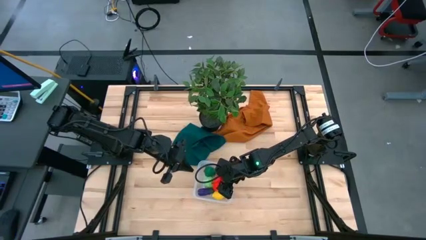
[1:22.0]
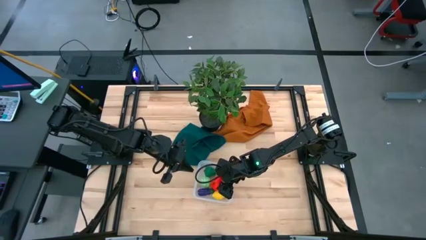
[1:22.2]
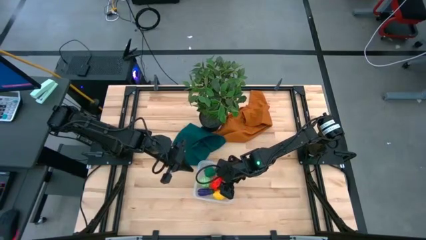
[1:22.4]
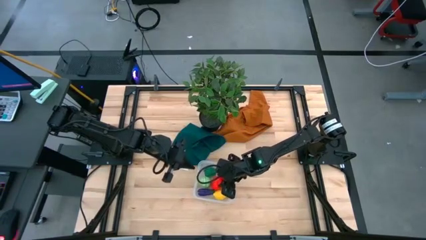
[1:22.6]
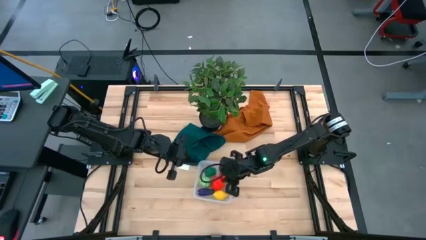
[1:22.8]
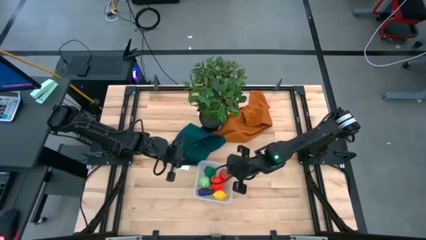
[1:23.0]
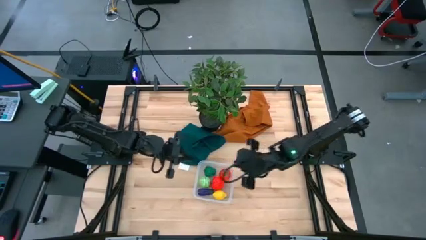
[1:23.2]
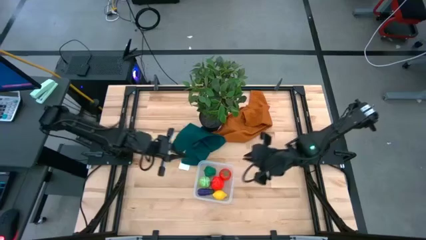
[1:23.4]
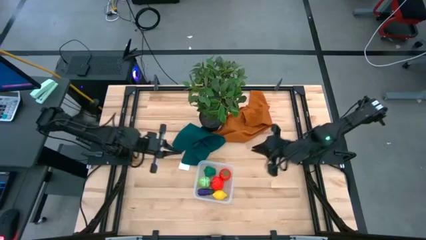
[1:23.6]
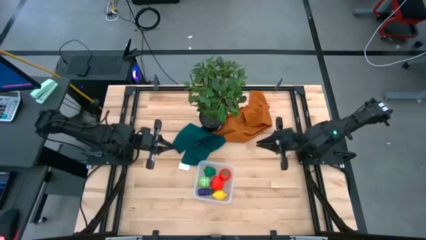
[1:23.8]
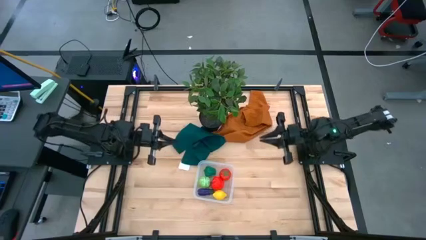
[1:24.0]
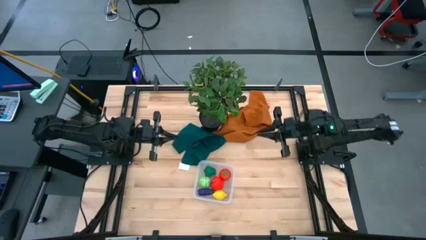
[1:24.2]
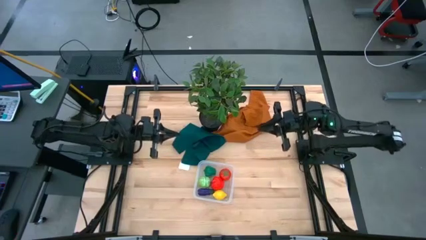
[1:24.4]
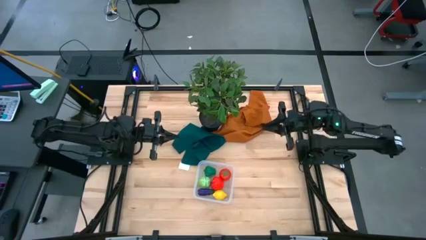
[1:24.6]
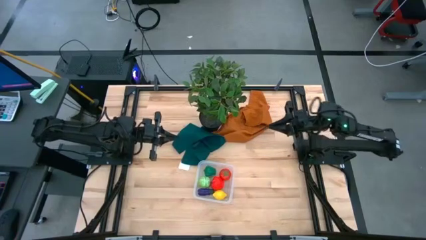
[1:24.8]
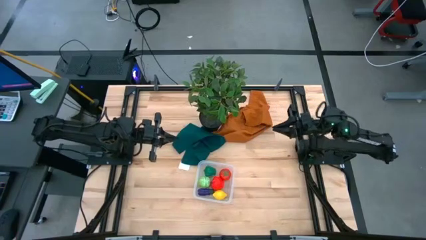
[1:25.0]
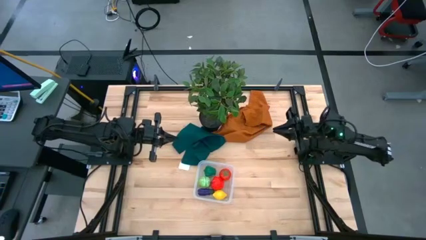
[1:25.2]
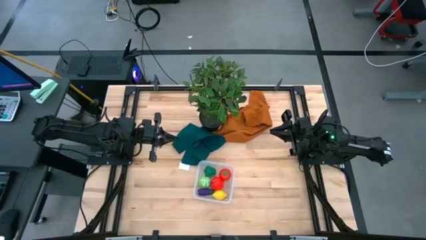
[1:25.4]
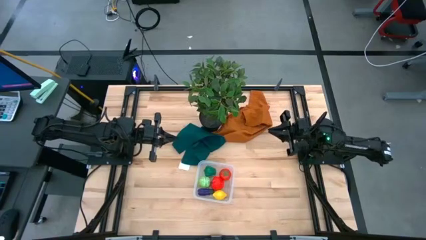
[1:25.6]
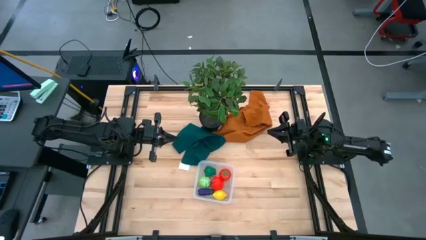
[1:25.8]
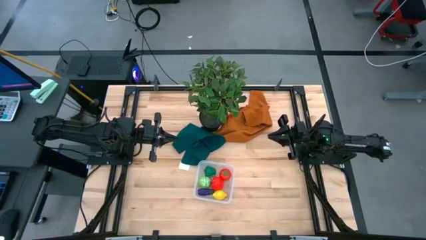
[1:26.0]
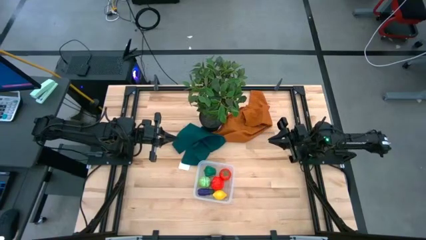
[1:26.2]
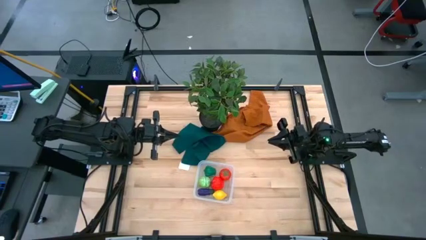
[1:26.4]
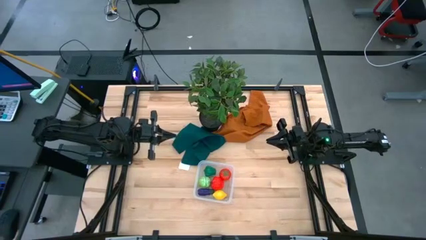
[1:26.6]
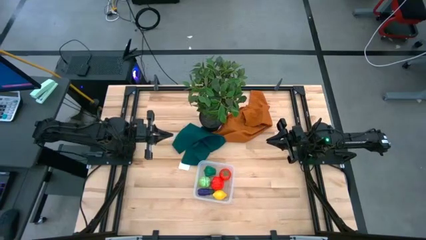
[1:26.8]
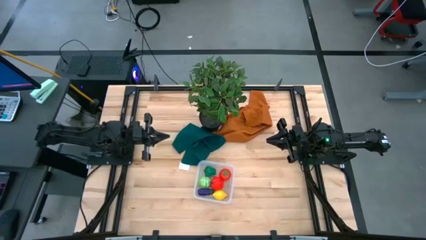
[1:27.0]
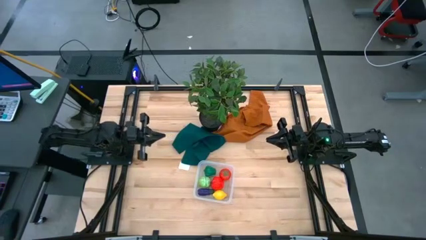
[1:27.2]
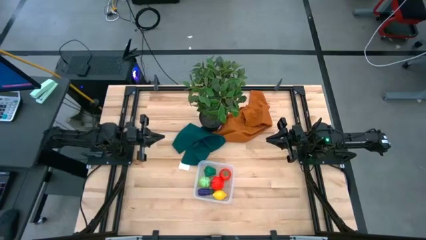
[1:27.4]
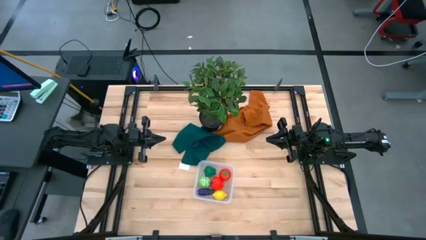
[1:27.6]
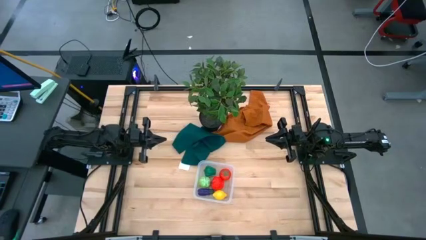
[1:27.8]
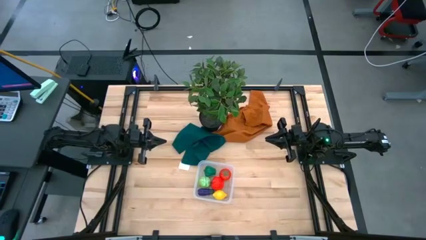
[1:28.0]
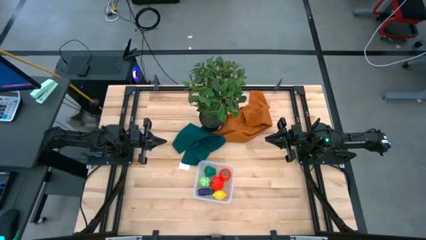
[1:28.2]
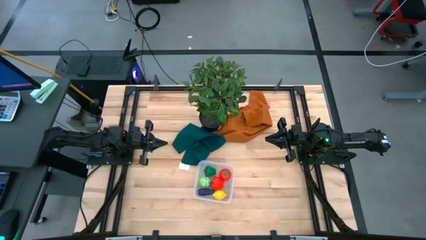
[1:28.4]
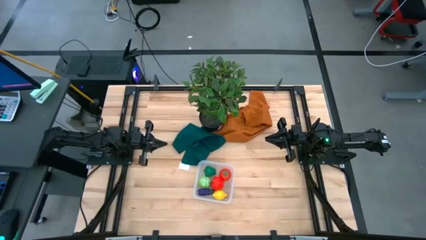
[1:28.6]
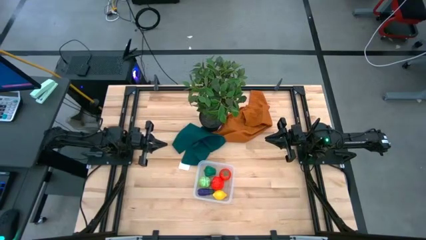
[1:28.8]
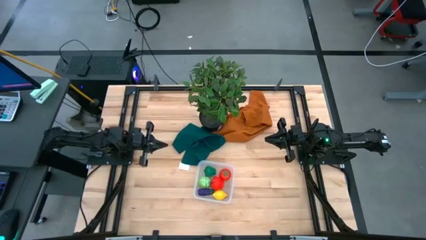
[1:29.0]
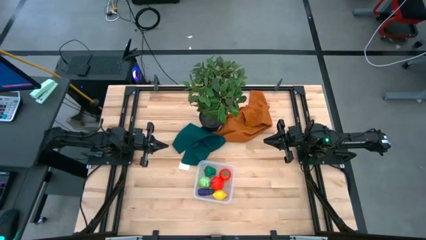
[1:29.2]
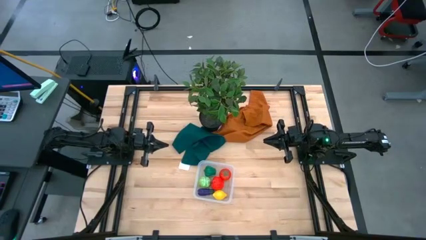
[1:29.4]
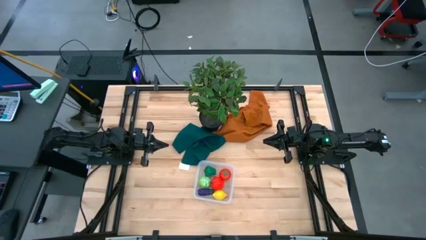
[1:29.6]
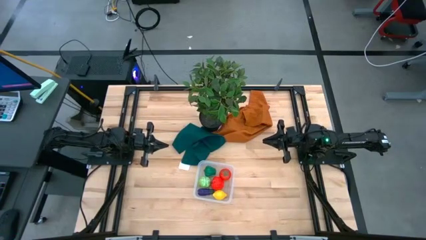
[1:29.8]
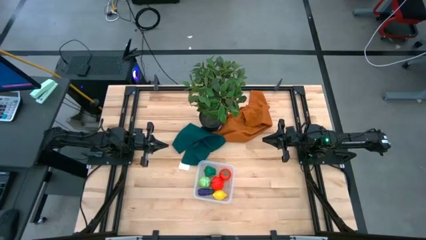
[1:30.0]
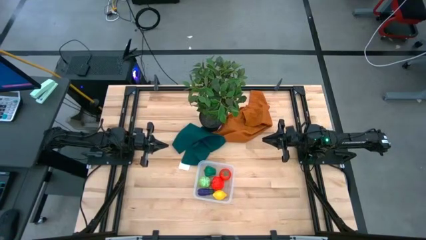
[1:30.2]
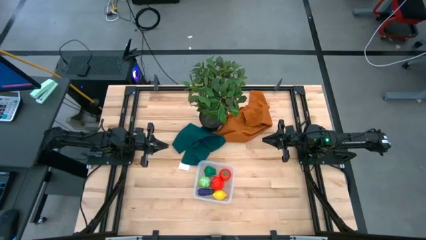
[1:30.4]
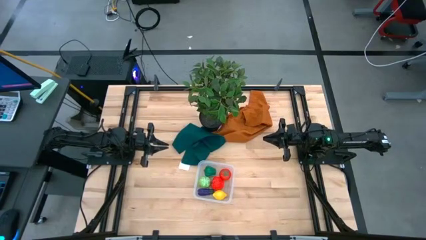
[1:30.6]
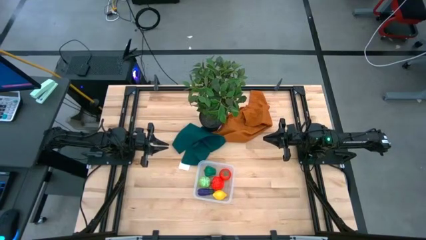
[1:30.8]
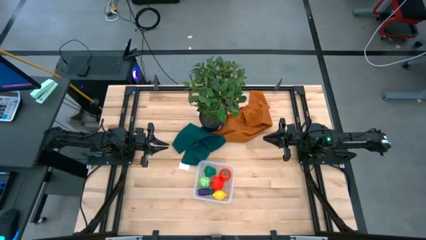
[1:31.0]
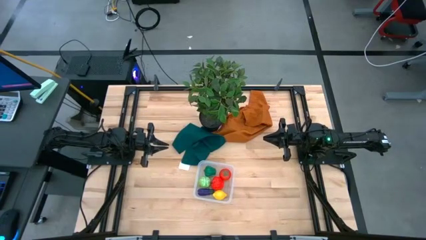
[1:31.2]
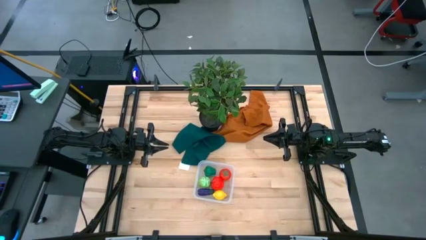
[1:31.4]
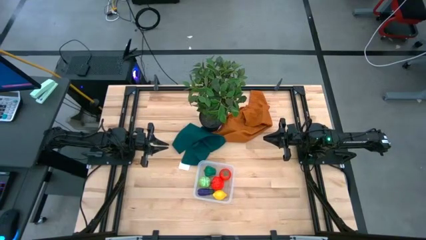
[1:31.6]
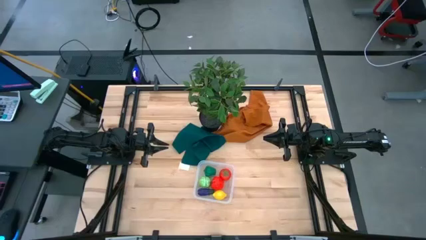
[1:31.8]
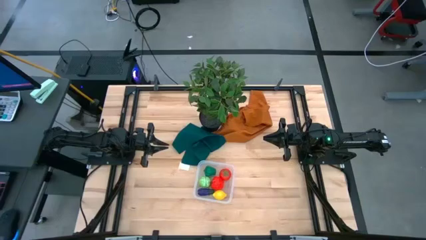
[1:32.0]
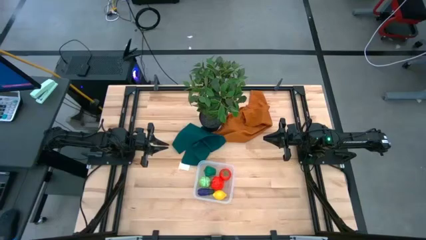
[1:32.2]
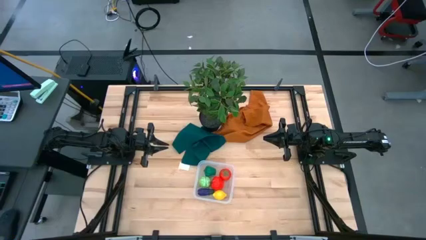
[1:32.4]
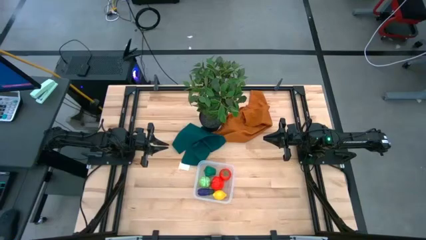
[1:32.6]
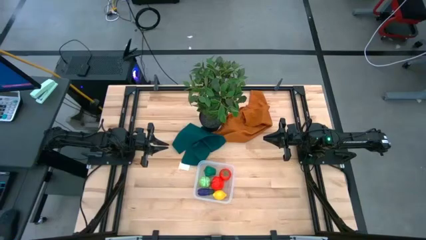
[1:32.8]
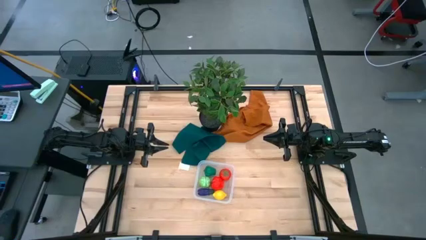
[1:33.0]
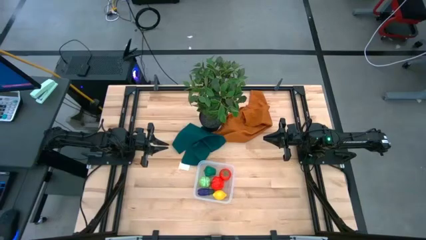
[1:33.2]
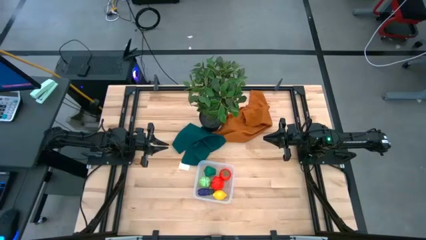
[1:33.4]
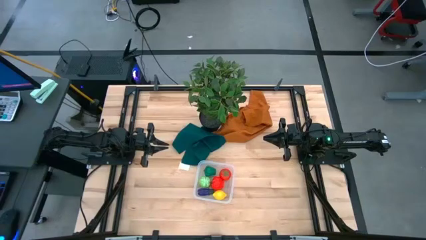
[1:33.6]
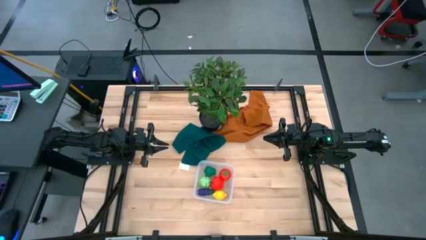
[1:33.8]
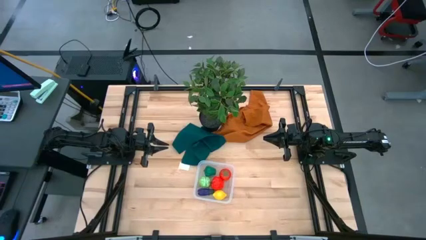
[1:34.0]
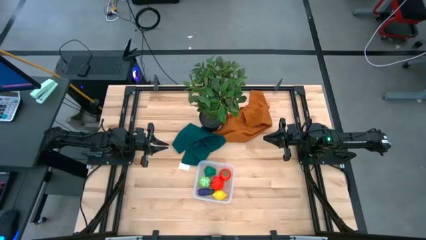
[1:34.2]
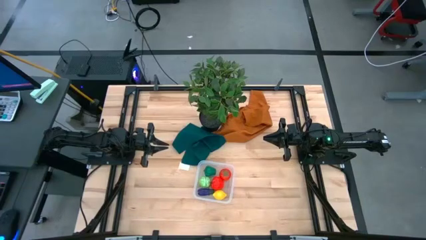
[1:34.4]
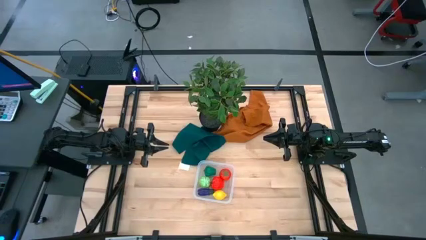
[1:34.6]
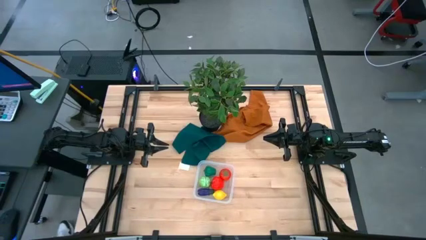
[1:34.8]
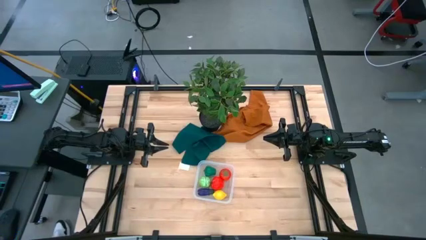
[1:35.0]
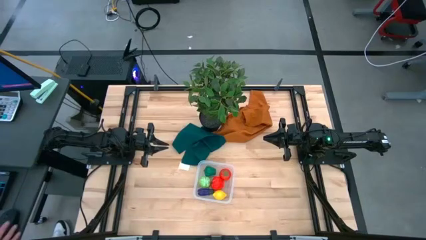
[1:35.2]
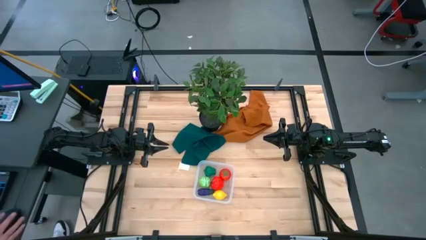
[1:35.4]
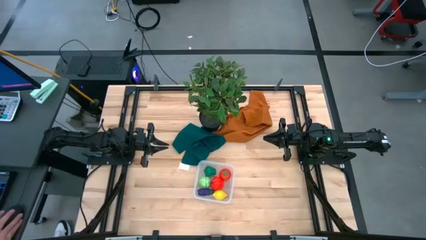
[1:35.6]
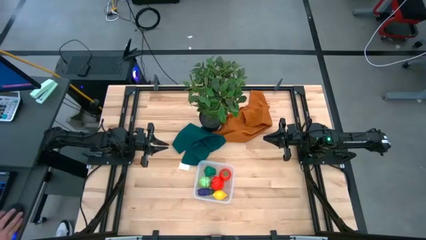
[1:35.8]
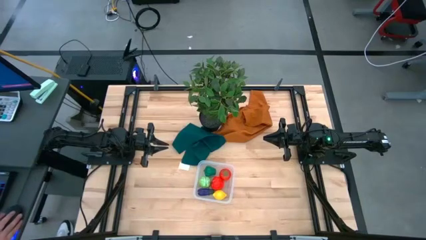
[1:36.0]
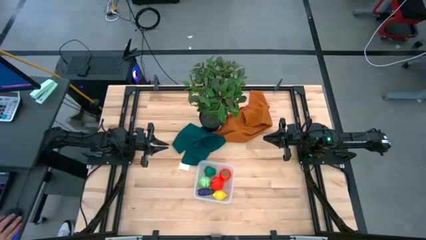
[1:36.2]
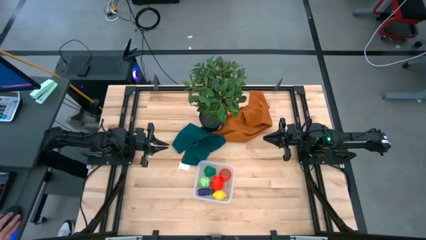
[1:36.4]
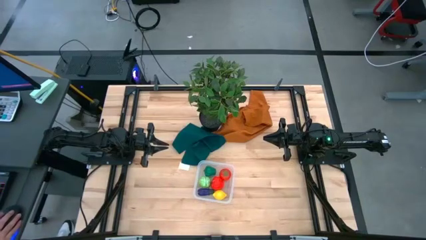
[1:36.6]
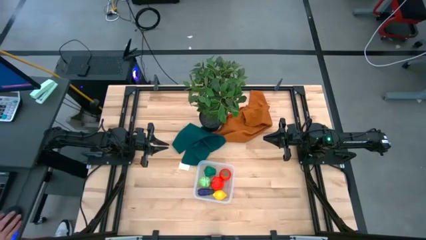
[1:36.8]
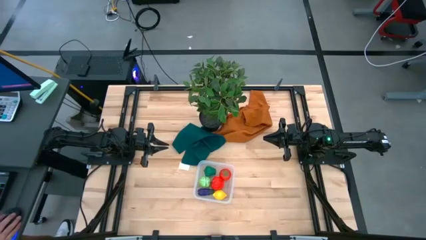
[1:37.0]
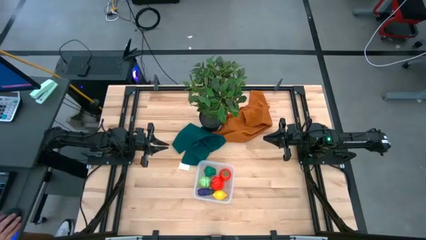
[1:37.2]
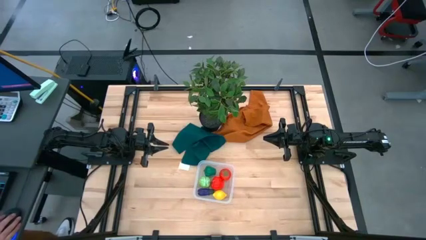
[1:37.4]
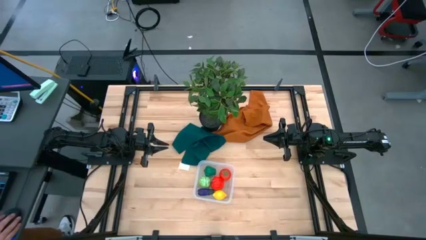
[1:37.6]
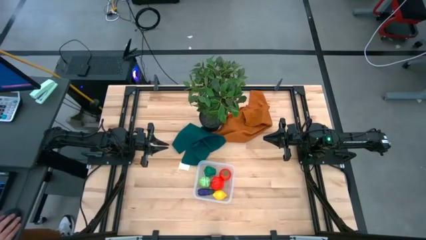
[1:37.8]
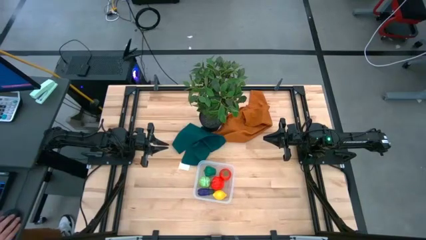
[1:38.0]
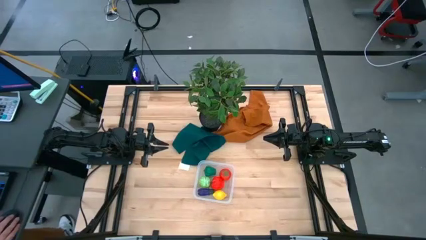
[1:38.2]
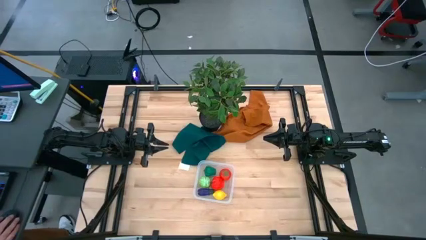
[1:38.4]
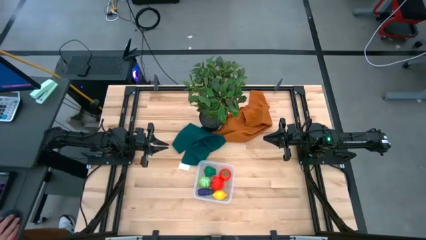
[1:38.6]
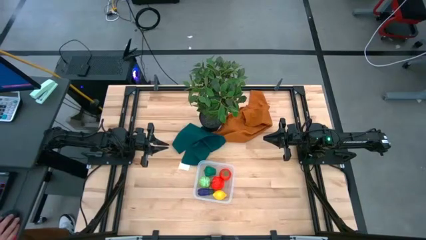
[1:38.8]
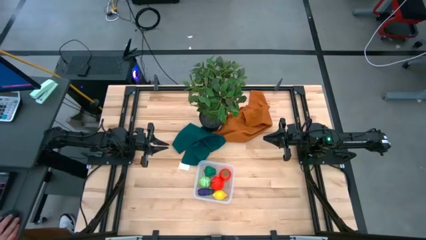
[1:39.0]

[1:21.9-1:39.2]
Task: Pick and placing Produce into tupperware
Return to Home Position
